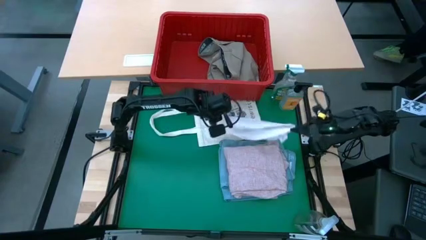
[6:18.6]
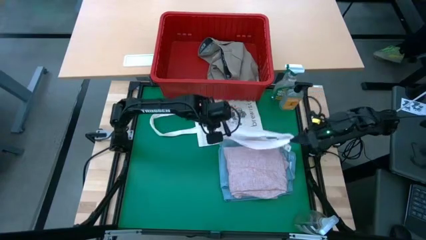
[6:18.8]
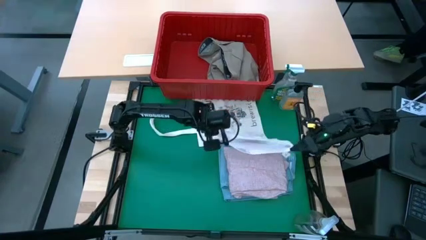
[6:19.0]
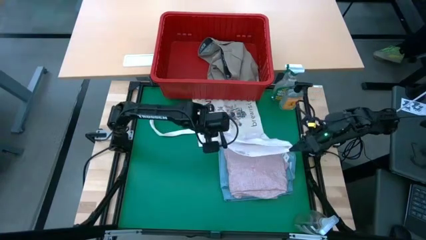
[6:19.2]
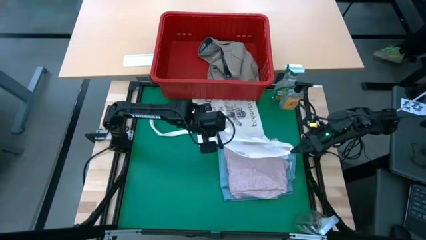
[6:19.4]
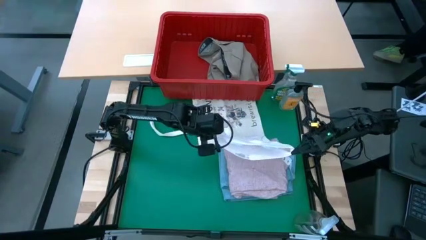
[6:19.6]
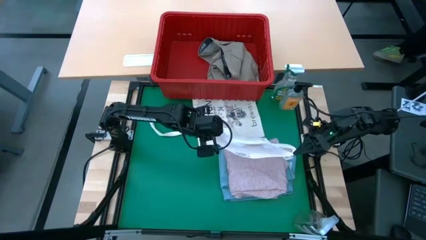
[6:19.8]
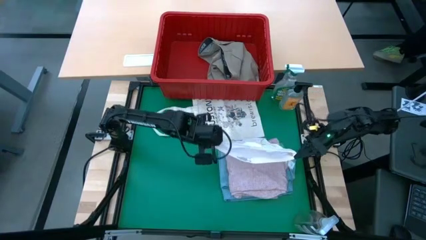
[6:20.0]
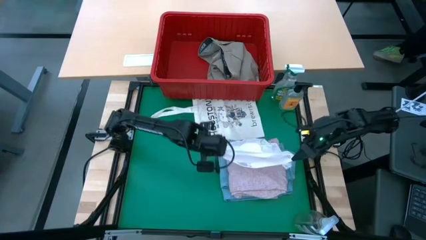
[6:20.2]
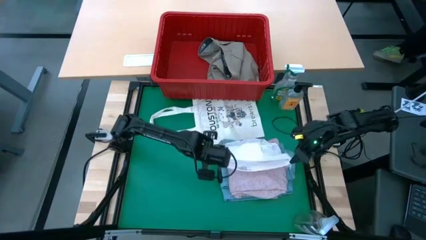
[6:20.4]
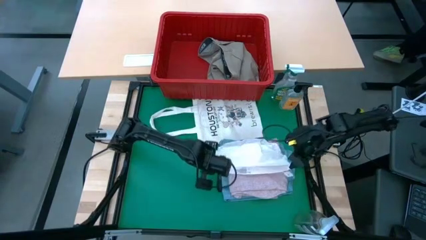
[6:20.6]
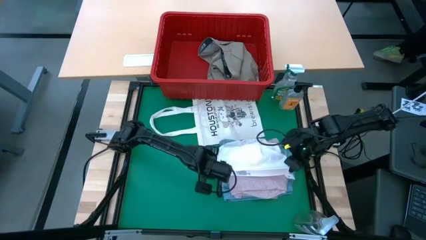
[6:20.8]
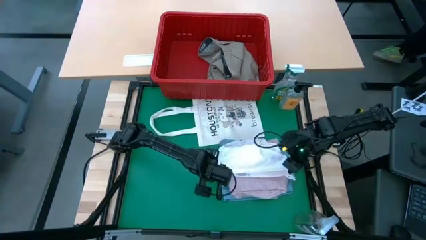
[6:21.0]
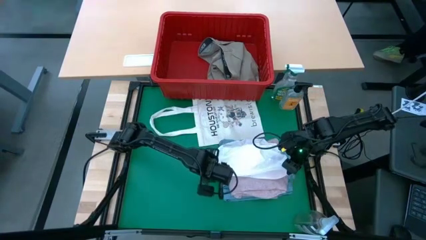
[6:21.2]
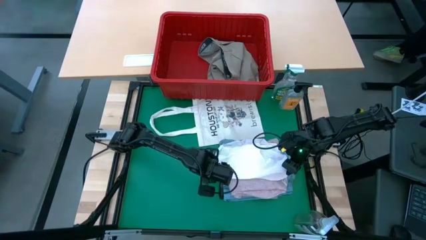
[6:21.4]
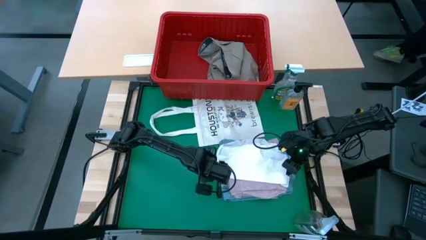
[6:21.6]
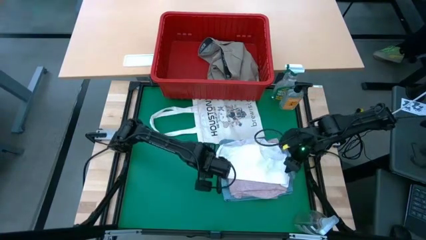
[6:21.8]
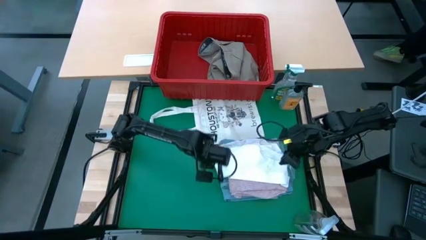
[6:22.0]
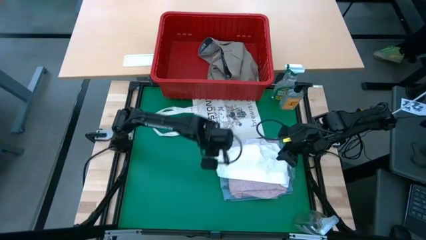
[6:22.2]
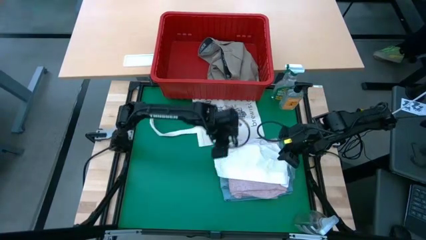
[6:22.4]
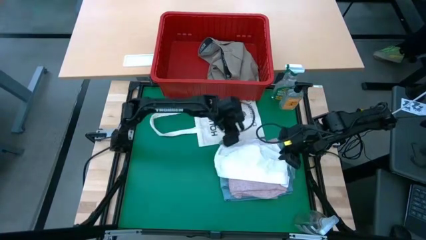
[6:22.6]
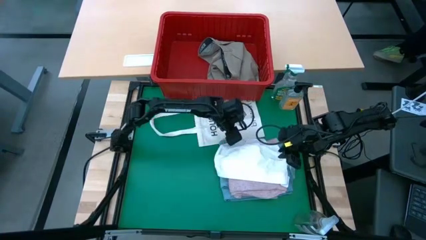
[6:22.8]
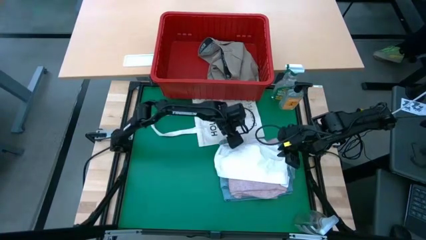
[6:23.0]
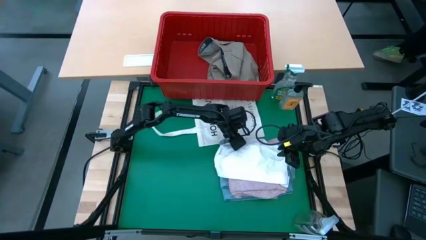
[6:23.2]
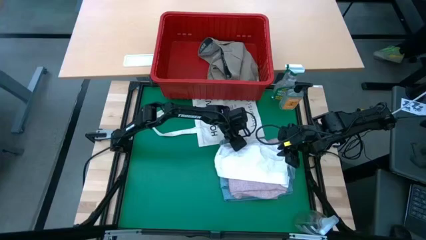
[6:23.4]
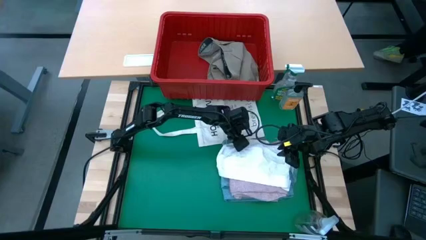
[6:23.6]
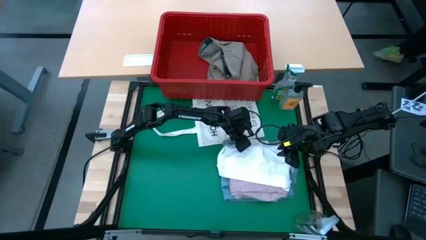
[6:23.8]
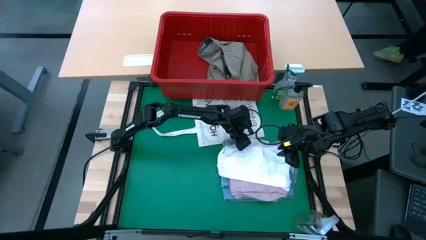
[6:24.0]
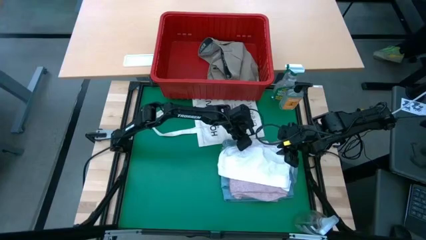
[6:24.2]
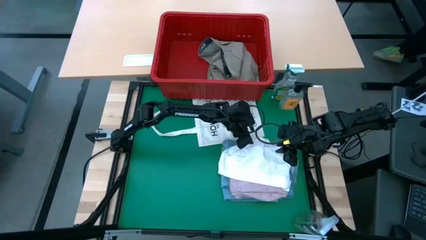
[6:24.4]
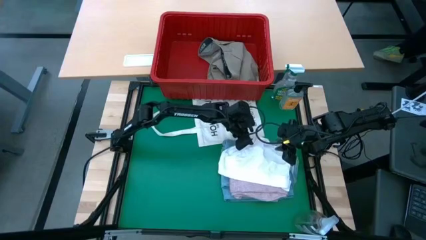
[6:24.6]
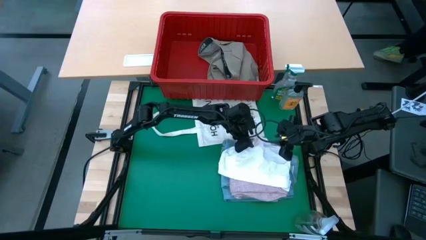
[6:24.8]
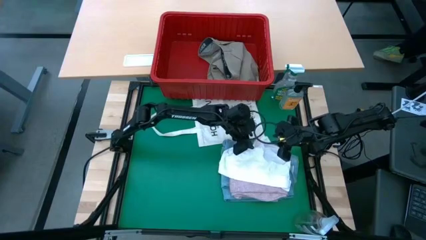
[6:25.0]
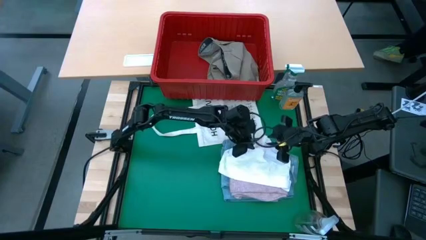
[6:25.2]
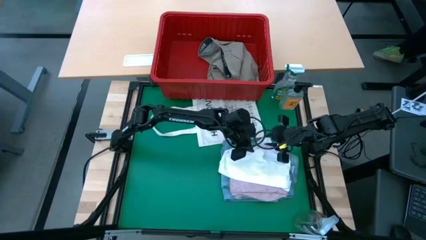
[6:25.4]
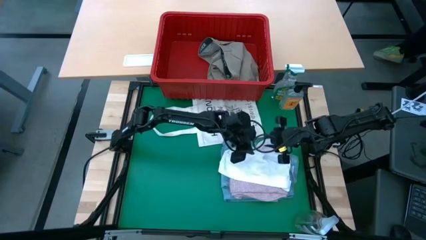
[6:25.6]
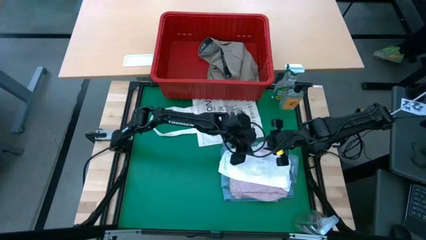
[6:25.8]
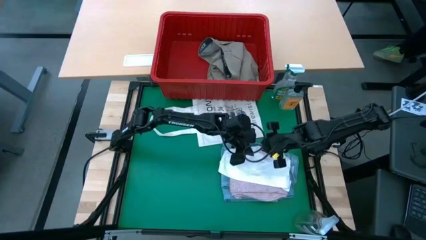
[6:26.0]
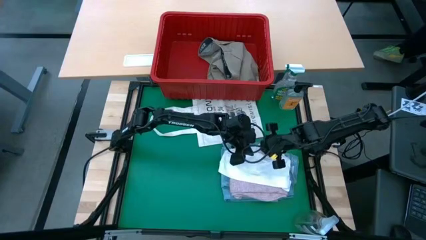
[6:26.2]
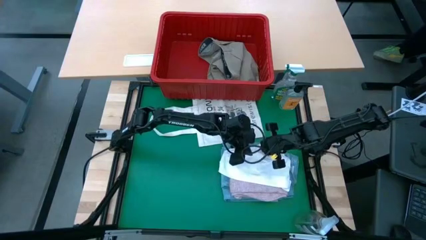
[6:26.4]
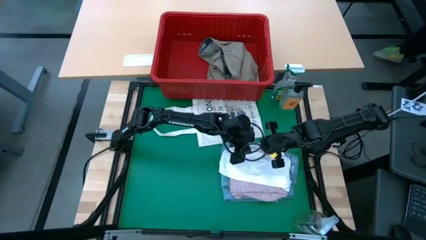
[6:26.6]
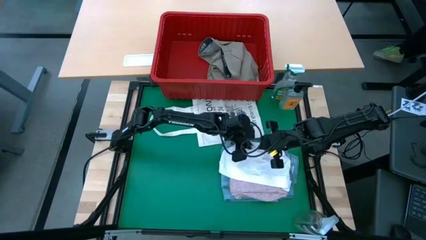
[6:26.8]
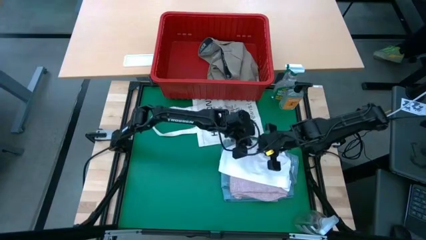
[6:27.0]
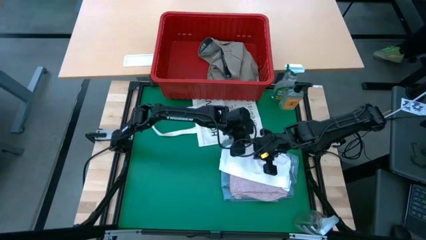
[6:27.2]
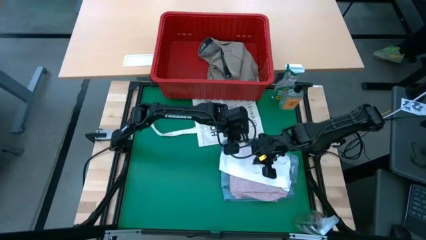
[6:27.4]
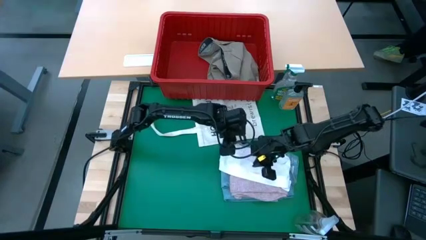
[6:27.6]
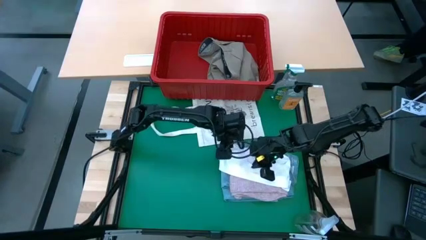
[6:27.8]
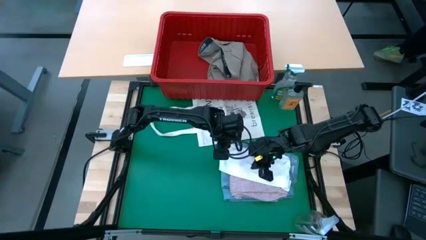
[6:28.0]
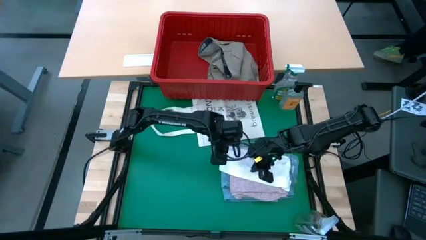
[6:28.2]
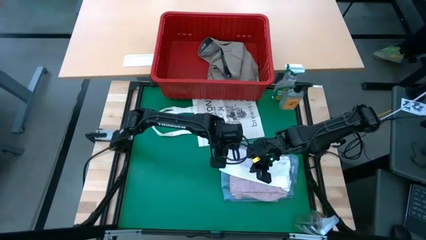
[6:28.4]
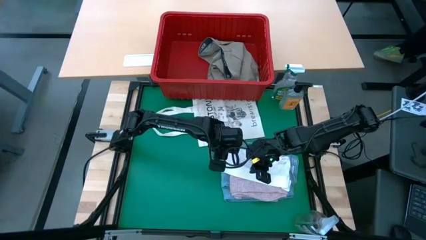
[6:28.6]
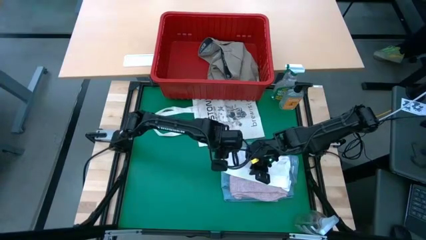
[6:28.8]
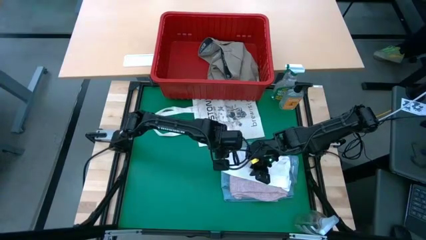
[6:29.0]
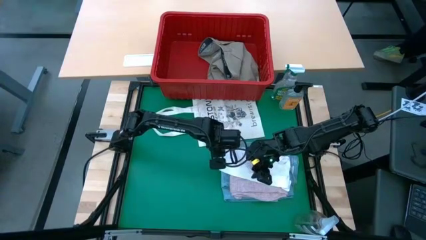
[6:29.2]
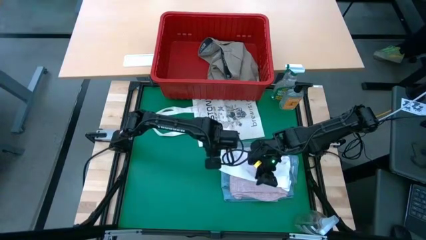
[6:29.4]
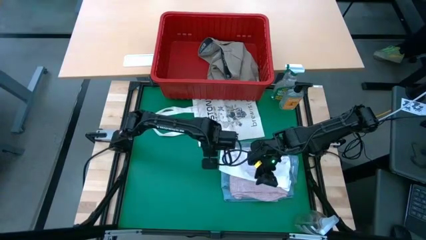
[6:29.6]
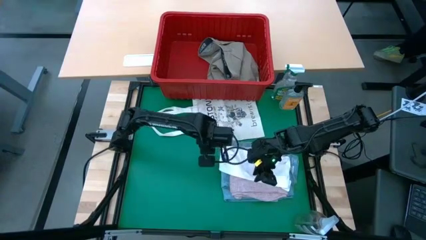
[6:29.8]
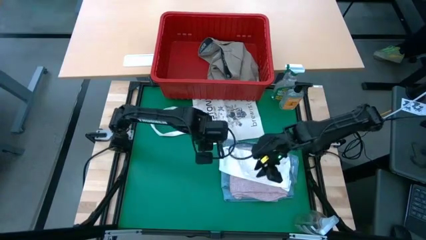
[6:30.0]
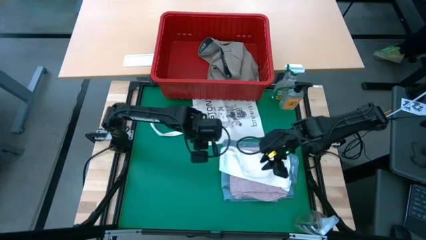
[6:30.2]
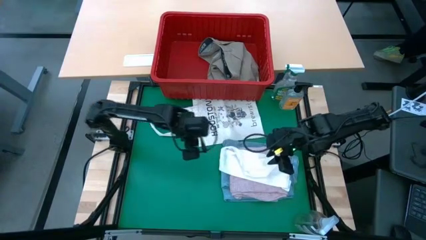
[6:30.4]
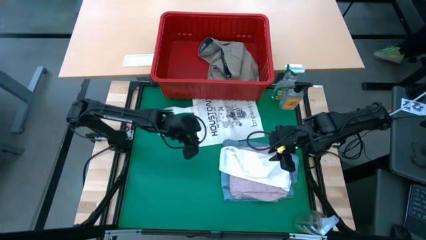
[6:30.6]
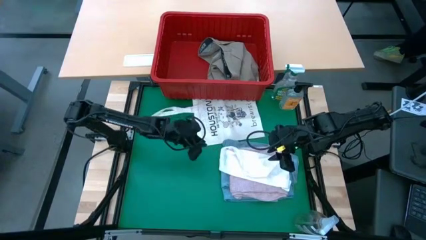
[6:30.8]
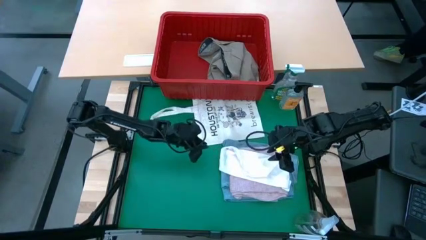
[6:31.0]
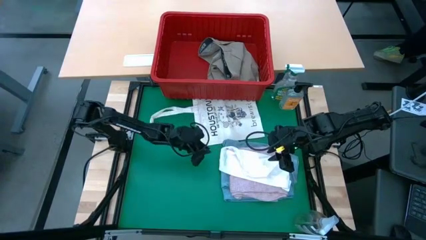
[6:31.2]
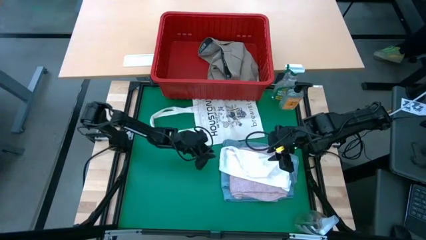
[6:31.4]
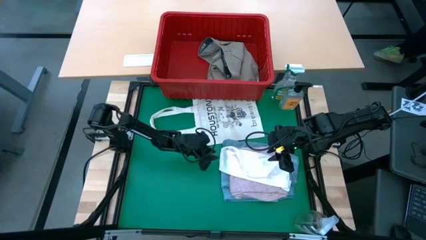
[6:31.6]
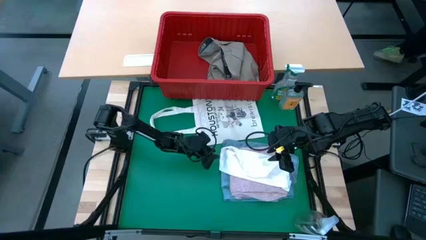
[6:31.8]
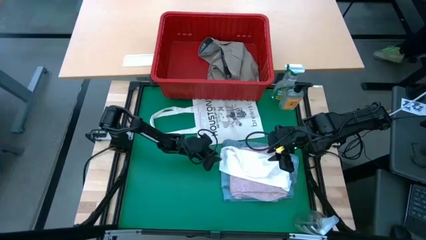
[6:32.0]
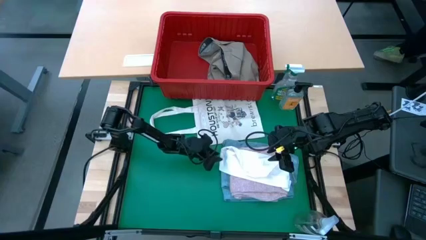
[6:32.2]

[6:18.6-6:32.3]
Task: Fold Laundry from Bin
Fold the white underwear from the red laundry basket

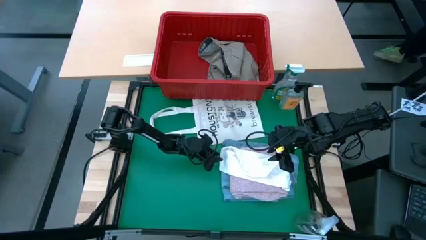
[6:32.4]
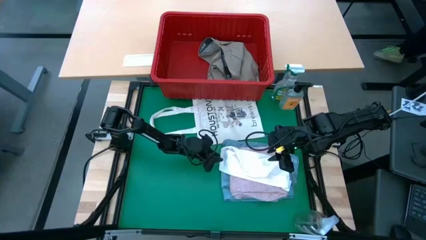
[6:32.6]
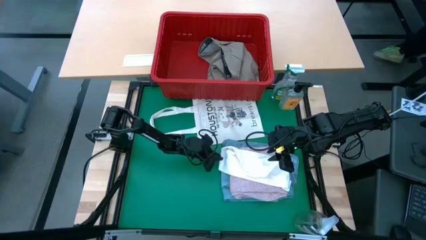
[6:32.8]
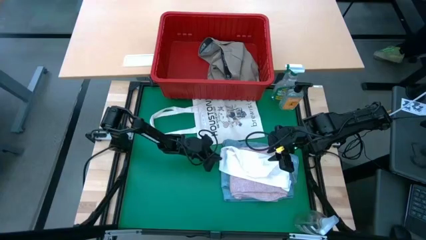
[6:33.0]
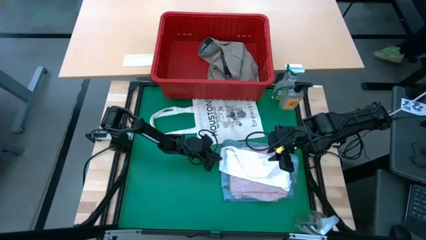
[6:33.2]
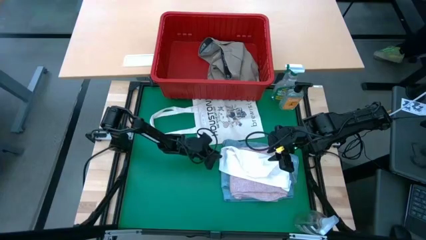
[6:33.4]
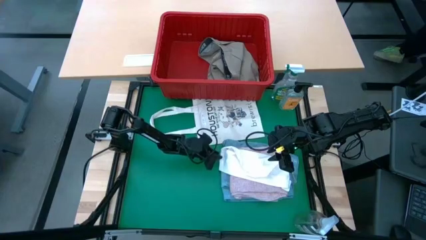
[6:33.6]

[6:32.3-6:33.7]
Fold the white underwear from the red laundry basket
